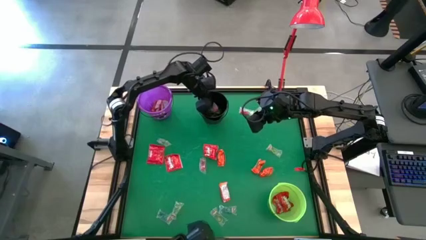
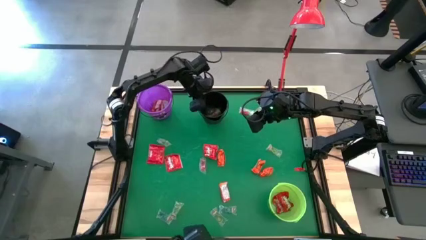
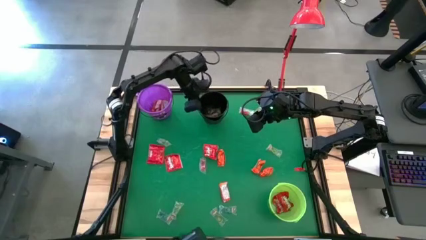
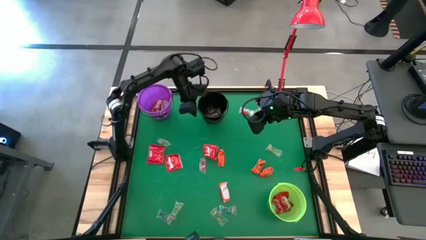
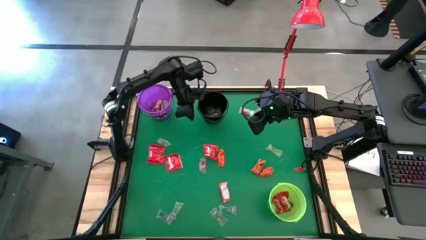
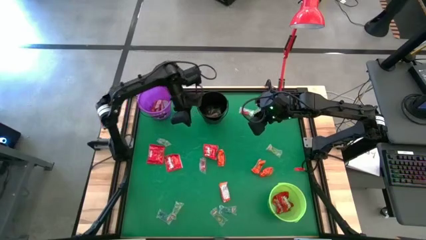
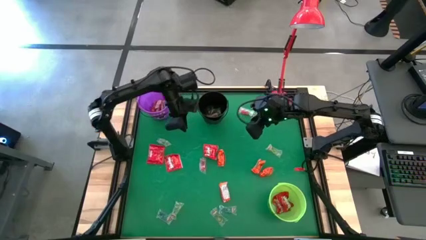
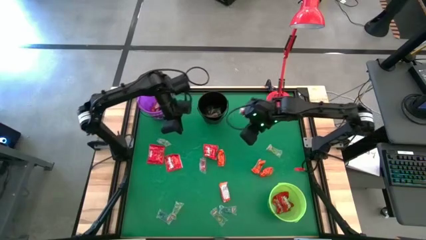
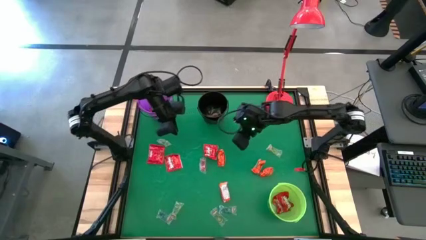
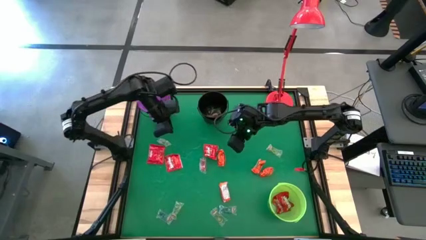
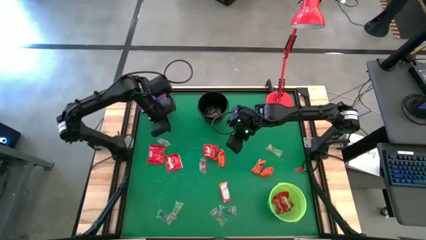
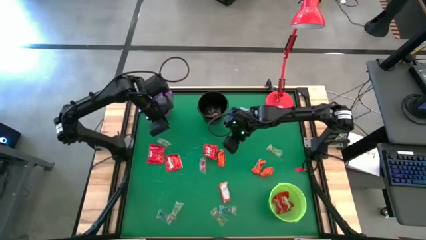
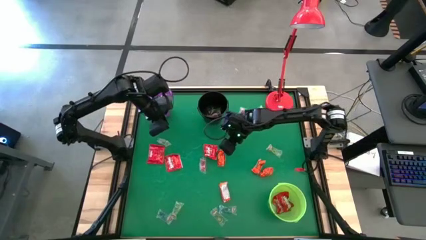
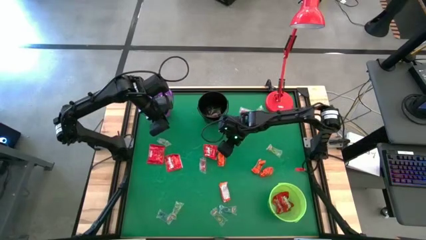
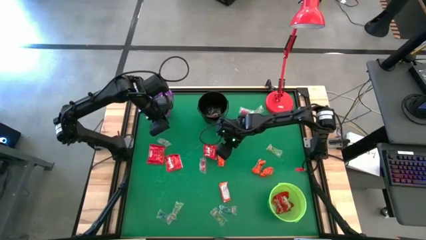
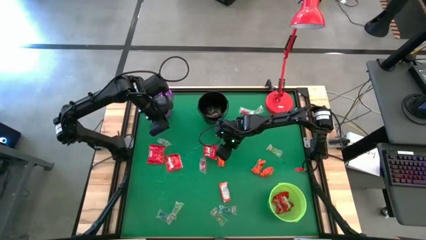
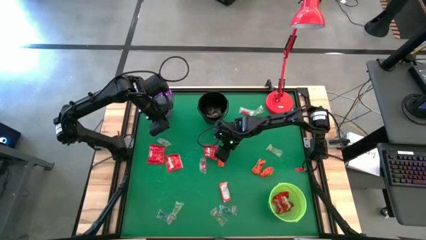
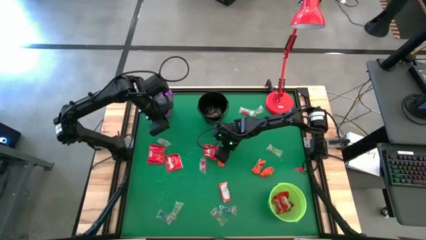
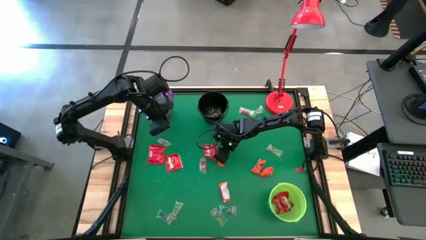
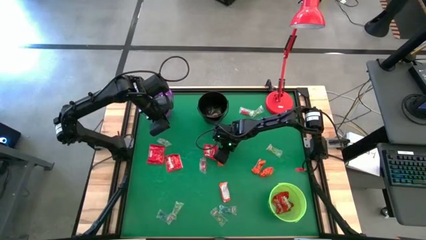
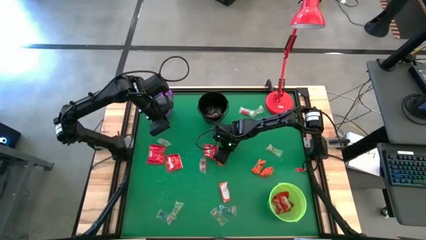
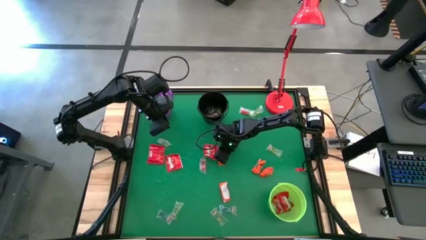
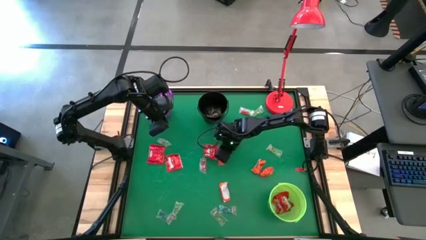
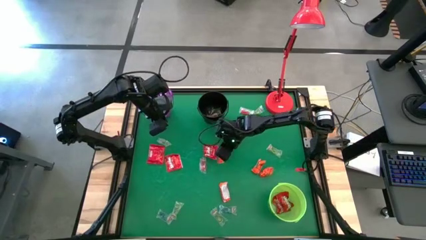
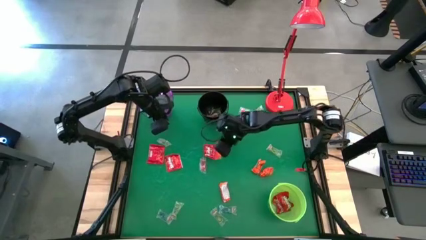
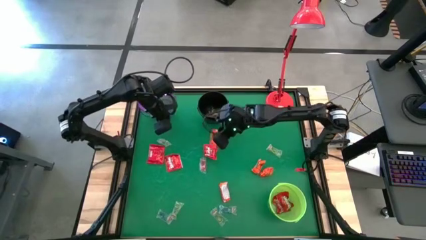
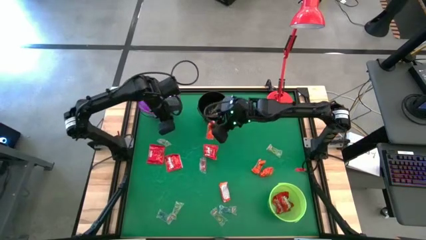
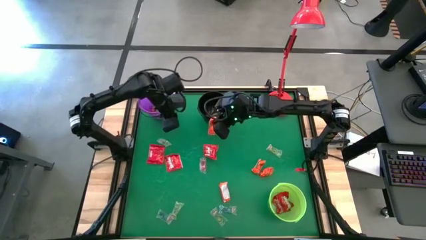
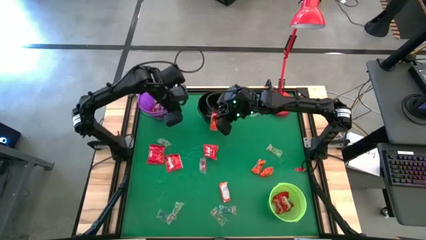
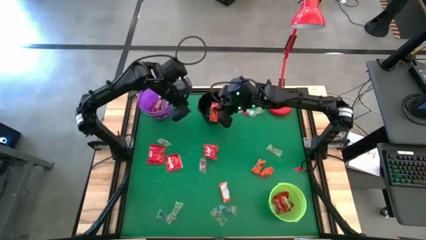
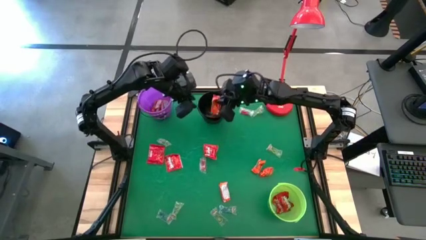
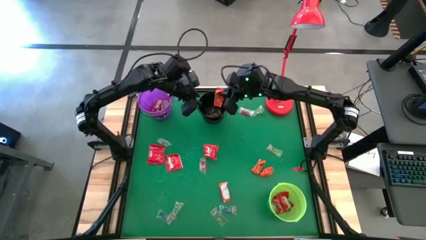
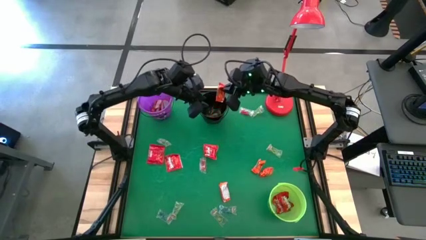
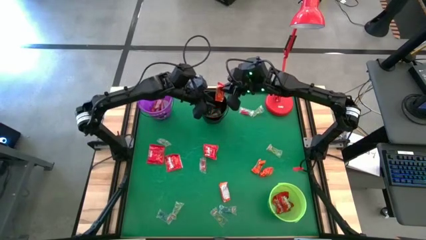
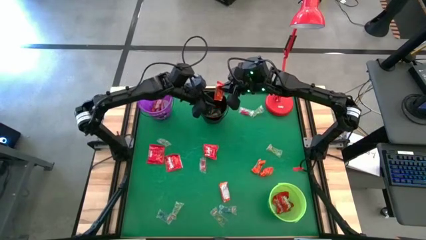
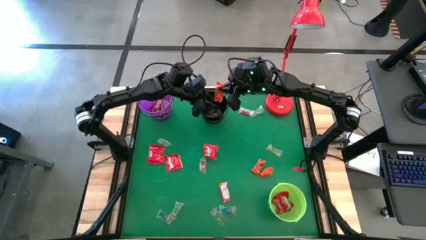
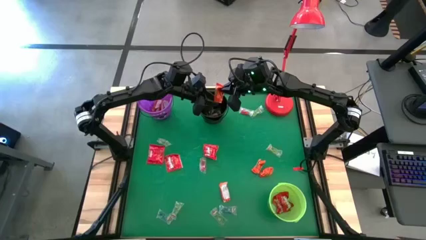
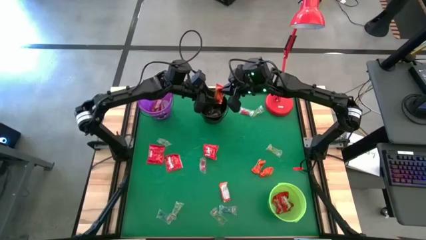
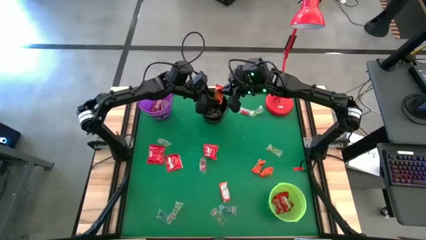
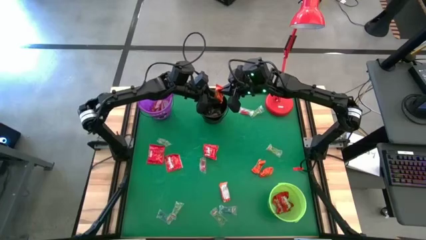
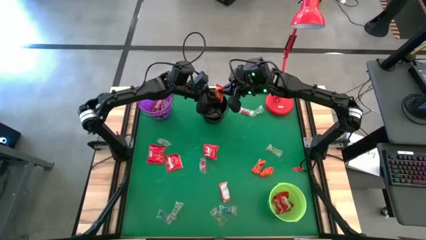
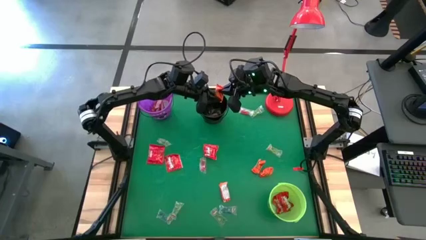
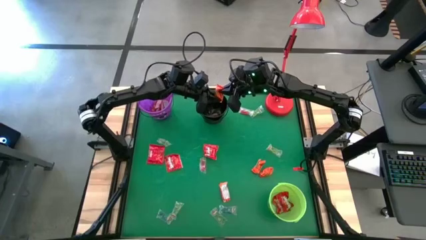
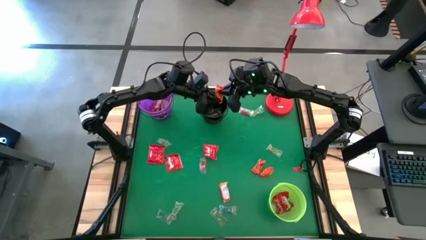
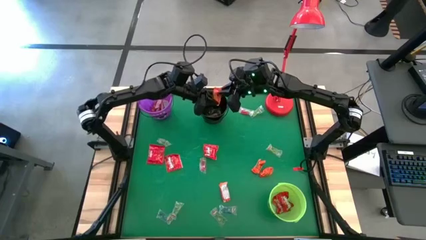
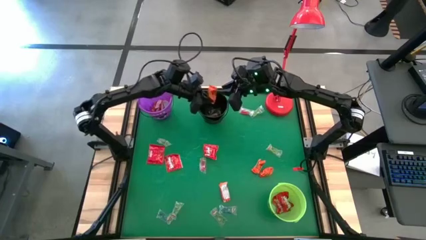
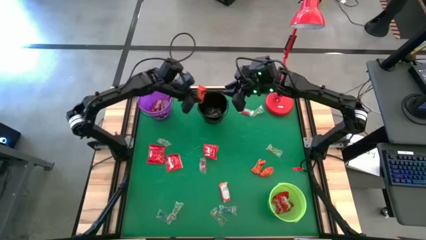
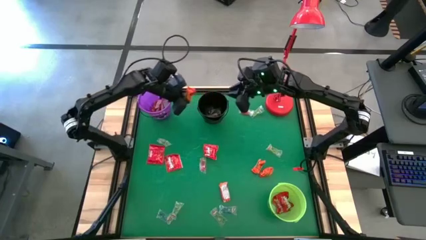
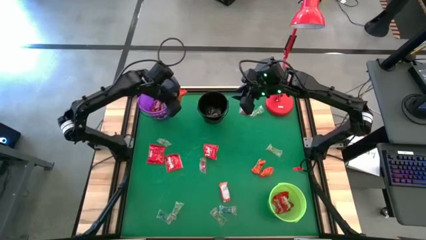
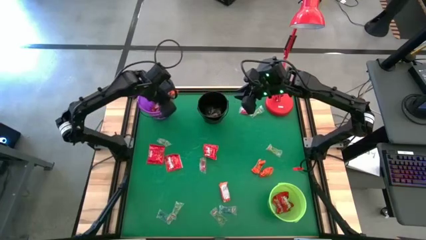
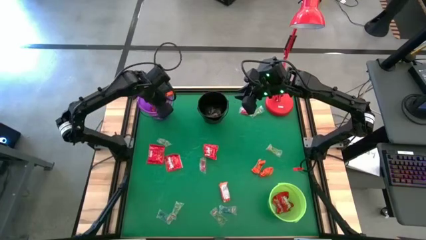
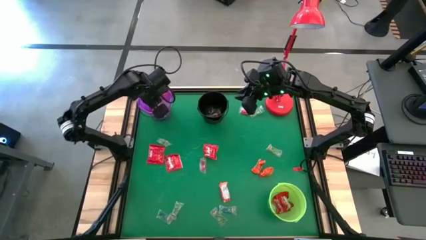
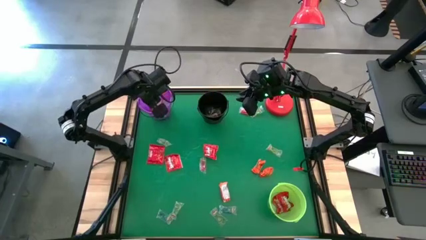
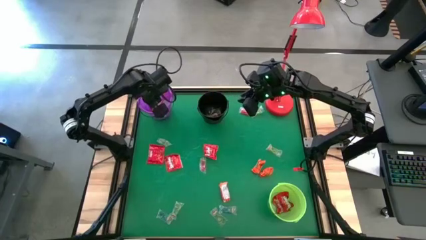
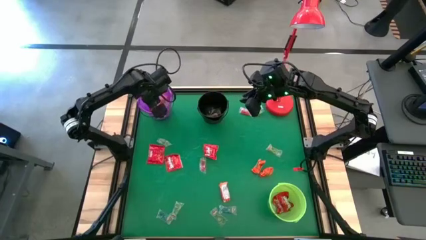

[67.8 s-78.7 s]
Task: Sort candy
Put the orange chocolate bar into the purple bucket
